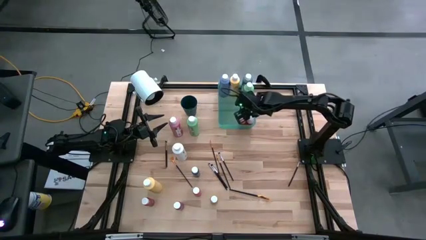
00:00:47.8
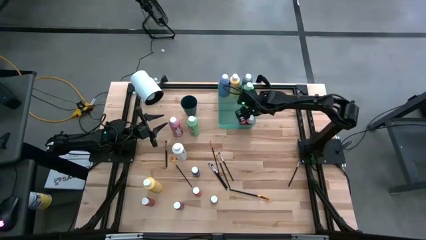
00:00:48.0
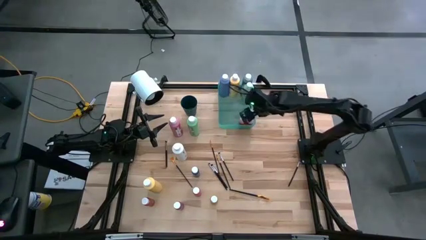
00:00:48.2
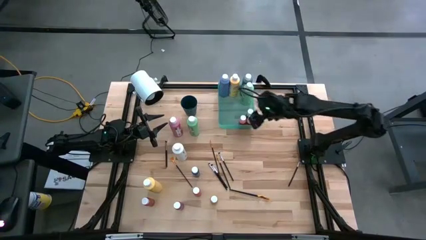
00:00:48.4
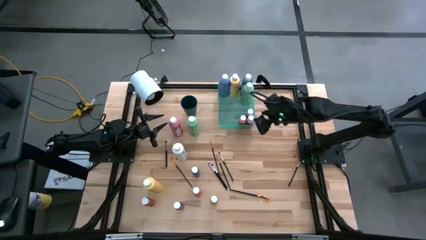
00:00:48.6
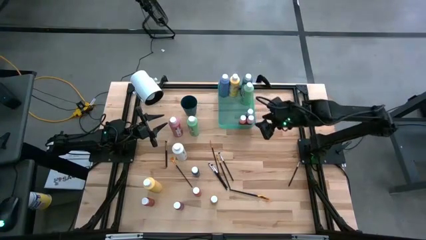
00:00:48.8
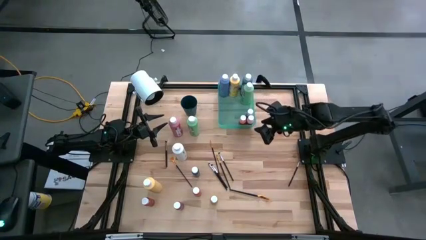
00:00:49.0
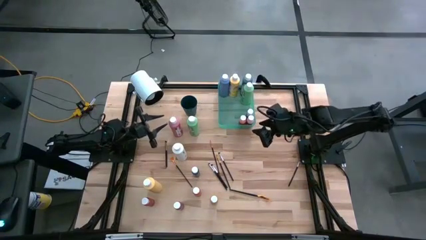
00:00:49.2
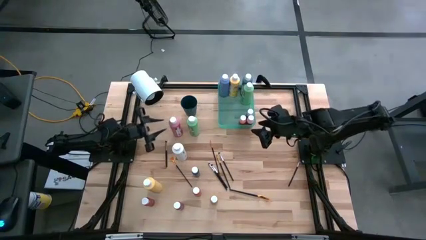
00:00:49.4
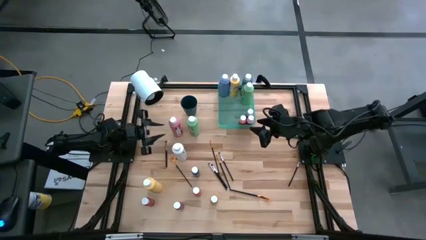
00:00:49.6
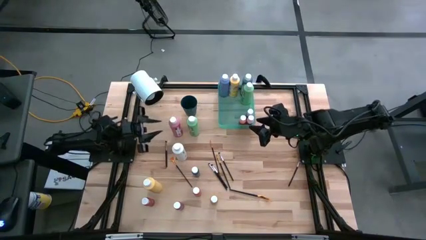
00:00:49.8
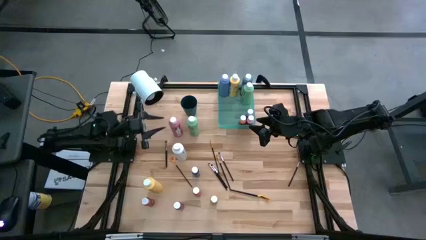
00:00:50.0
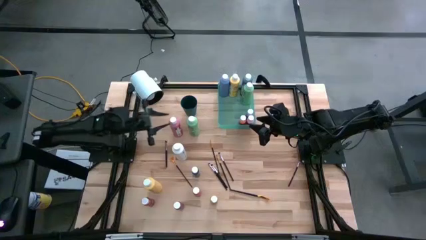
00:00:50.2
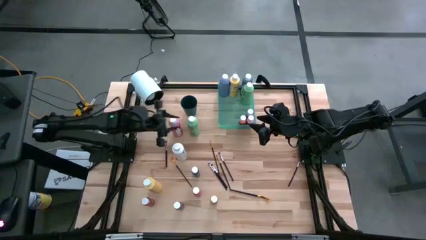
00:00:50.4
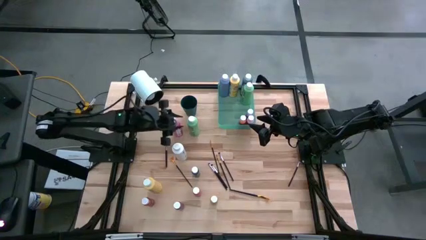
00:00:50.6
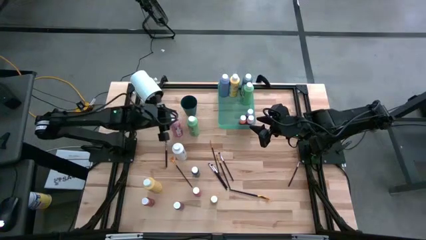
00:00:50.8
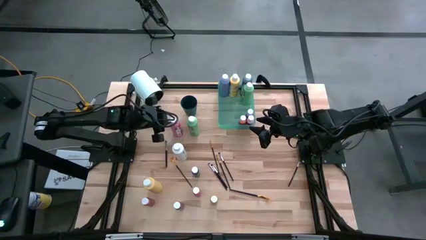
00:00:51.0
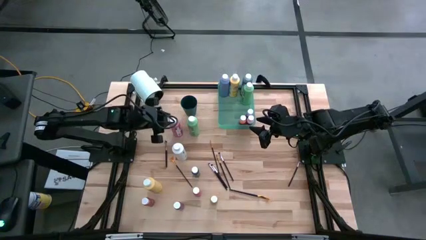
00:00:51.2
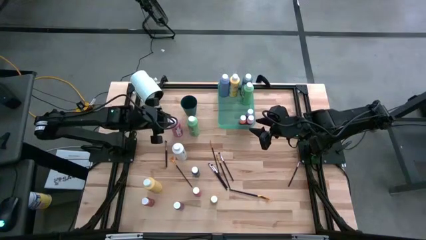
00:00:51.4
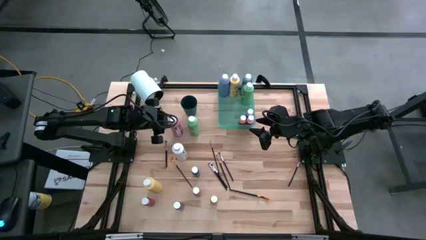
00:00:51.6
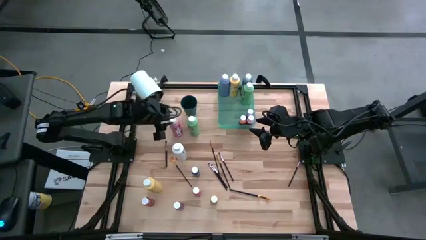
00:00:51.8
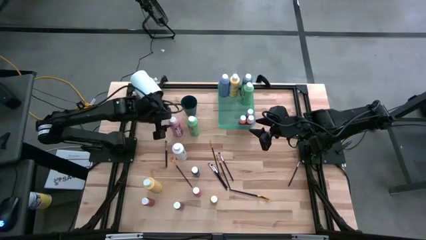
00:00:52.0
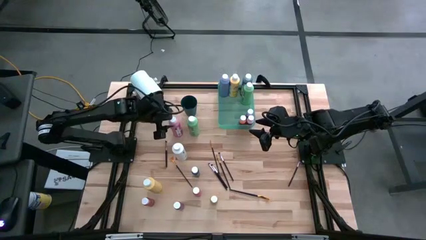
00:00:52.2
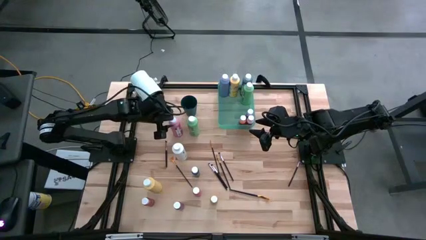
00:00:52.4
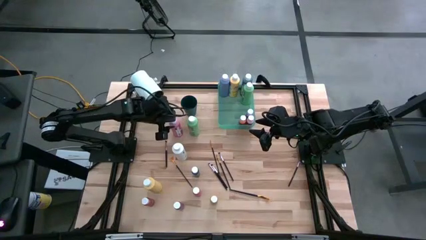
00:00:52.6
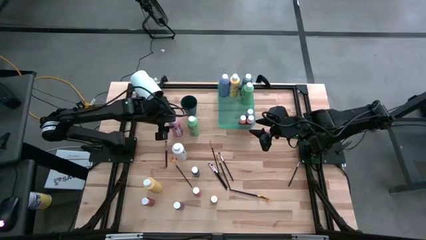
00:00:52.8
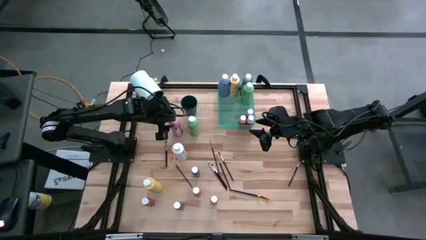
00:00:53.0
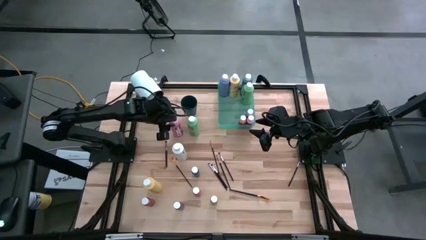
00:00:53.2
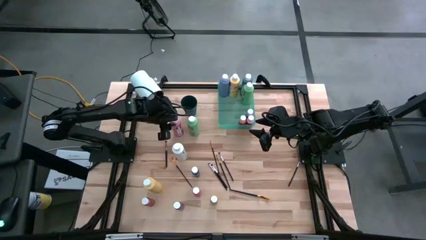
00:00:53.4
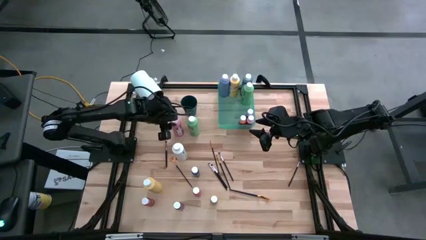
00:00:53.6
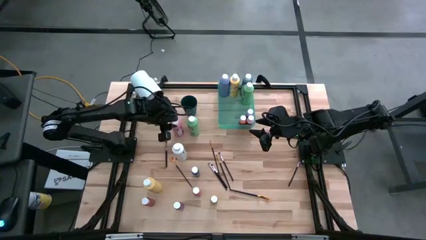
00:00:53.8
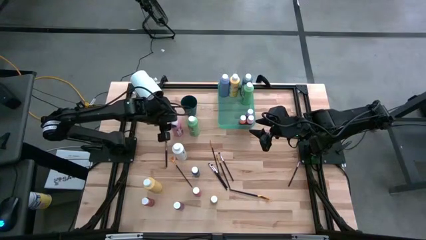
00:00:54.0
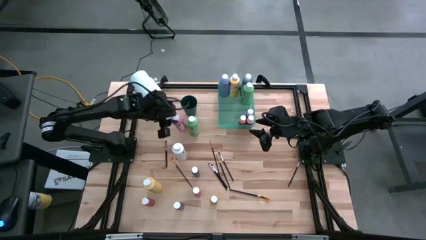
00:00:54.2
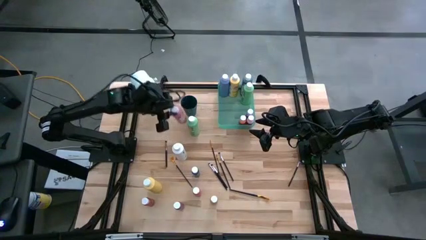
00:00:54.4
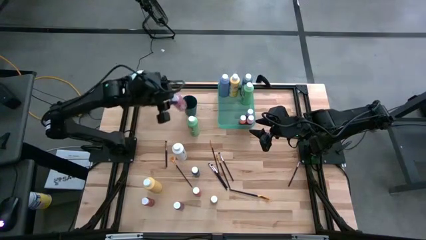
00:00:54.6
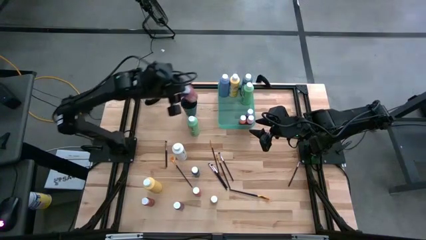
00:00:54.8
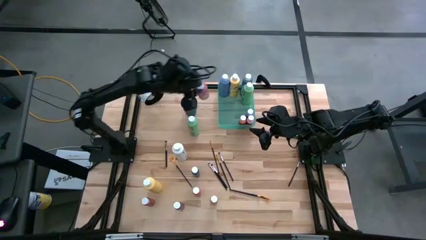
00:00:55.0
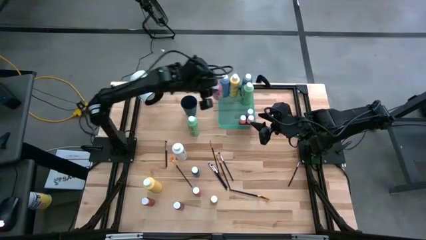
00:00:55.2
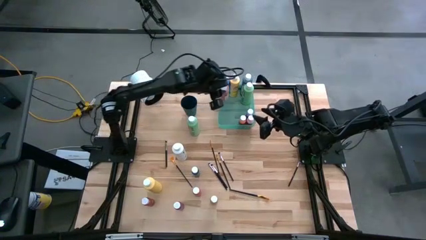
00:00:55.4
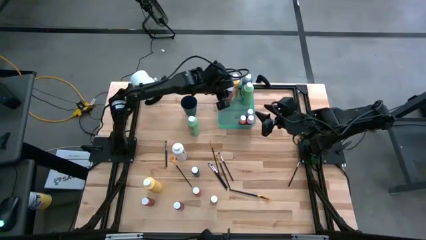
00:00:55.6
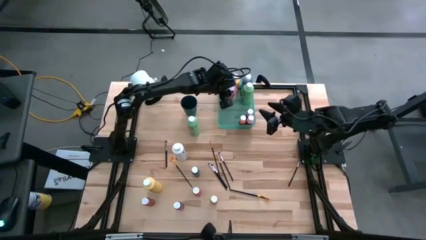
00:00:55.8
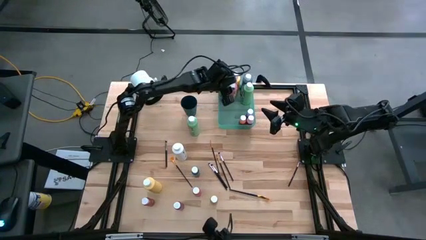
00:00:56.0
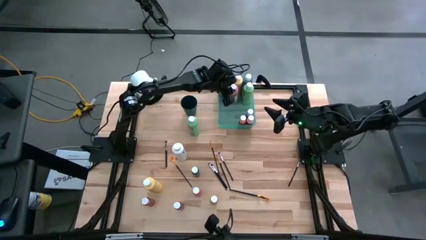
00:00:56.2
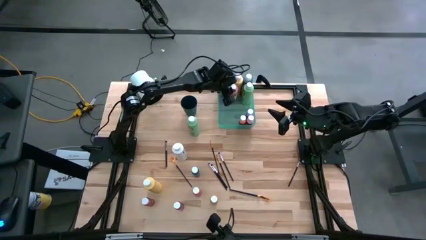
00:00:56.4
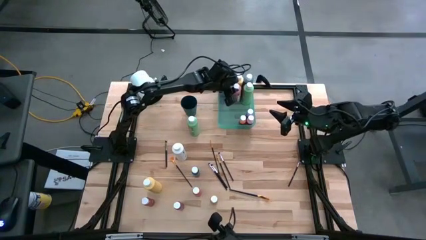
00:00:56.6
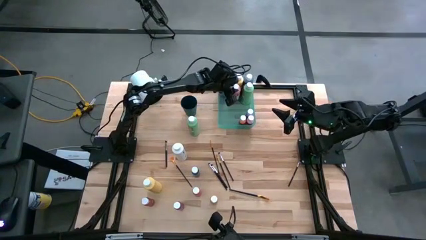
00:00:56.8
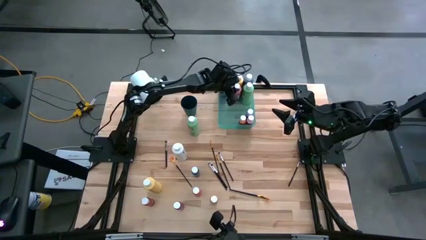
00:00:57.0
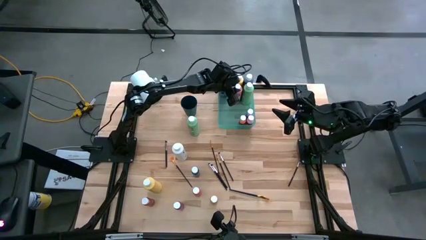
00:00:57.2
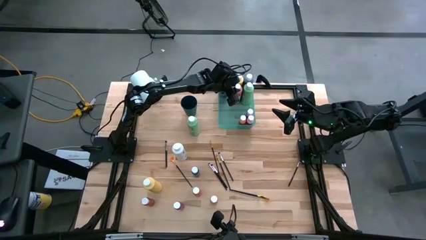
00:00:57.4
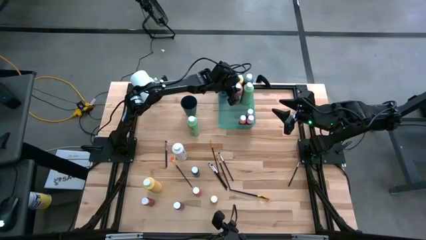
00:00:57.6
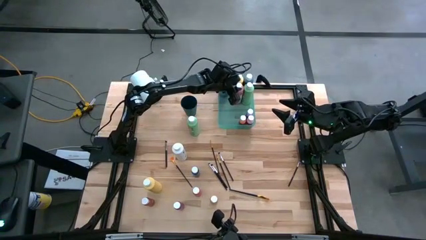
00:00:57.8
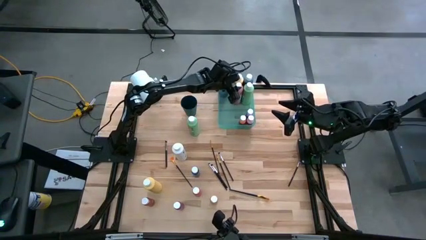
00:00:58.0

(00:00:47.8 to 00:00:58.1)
Task: Pick & Place Paint Supplies
Put the pink big paint bottle into the green bin

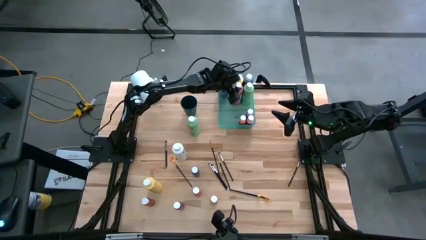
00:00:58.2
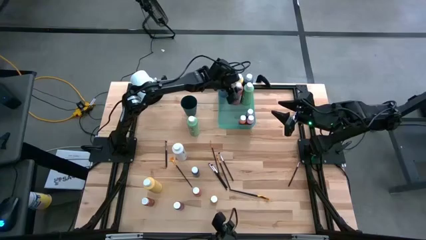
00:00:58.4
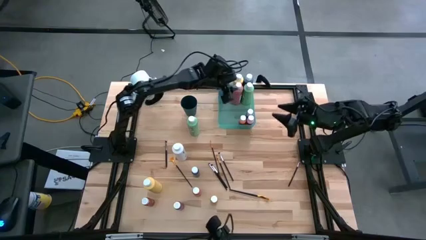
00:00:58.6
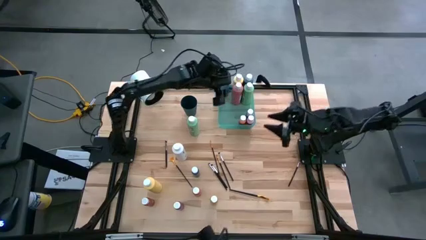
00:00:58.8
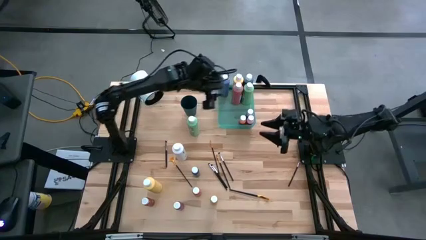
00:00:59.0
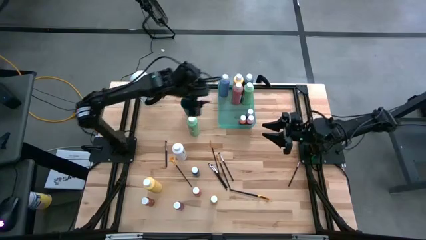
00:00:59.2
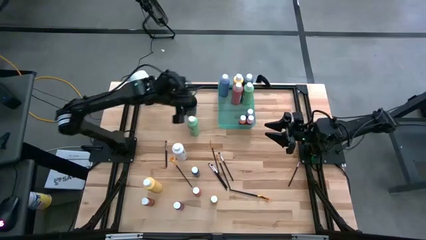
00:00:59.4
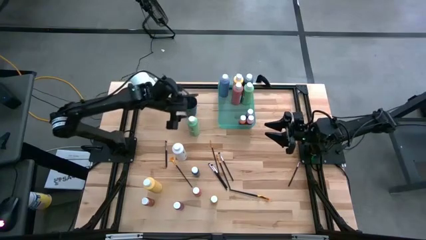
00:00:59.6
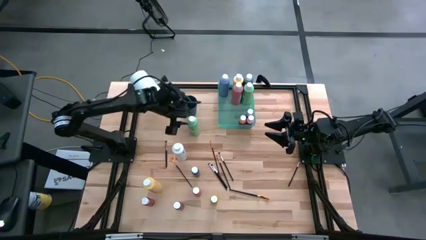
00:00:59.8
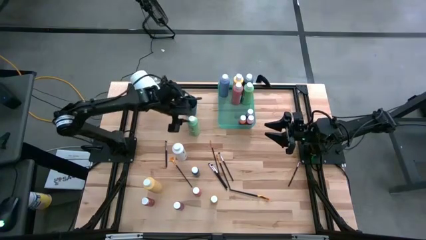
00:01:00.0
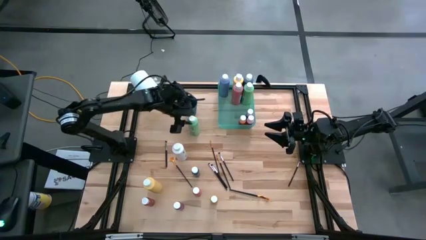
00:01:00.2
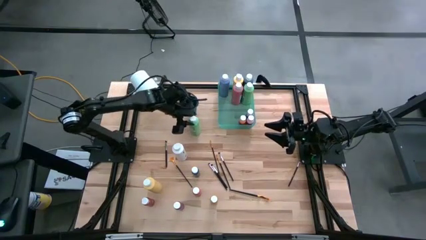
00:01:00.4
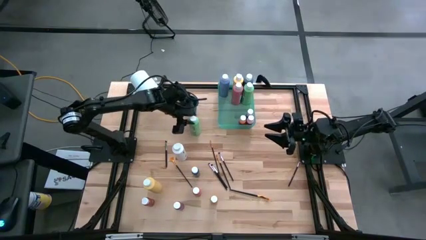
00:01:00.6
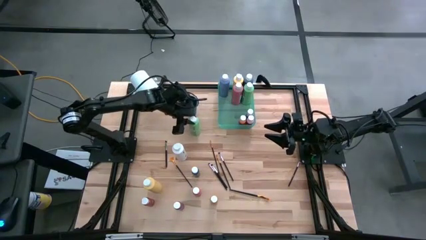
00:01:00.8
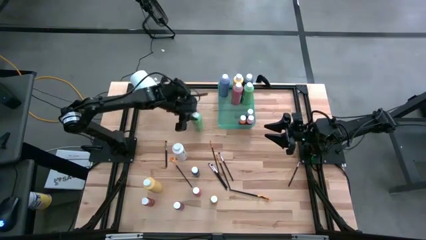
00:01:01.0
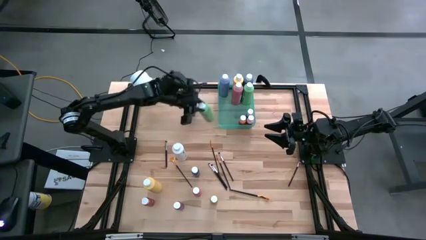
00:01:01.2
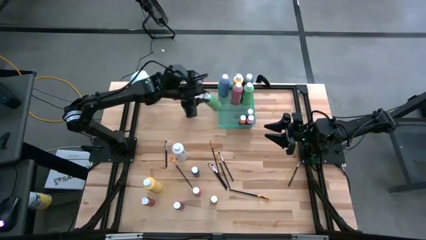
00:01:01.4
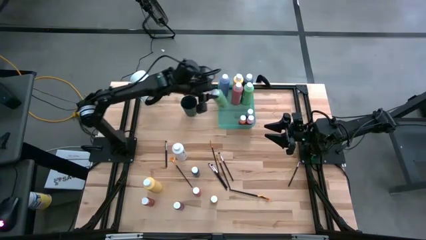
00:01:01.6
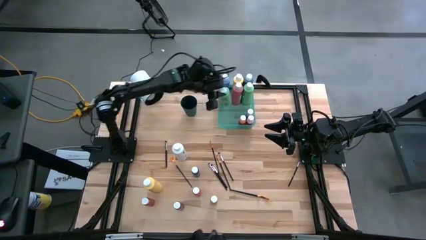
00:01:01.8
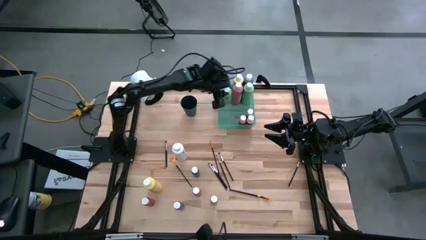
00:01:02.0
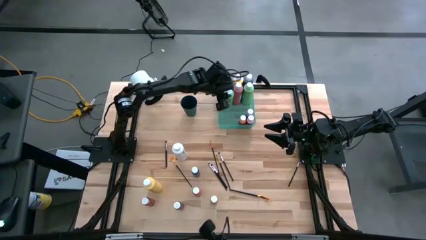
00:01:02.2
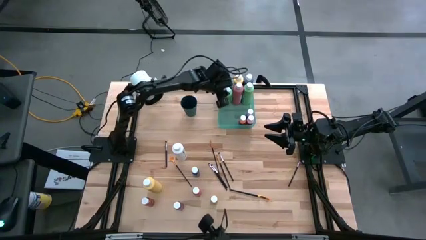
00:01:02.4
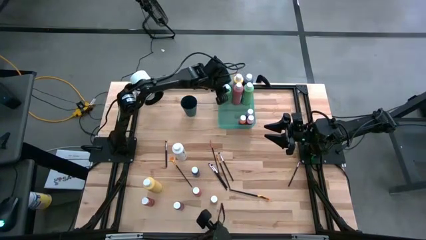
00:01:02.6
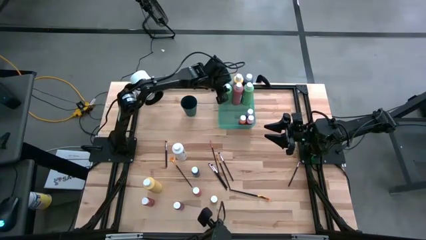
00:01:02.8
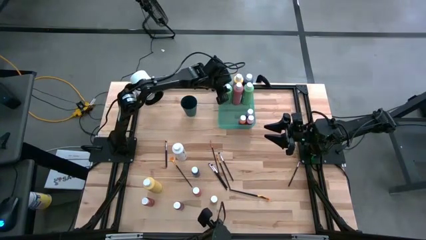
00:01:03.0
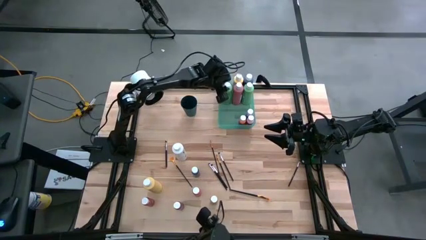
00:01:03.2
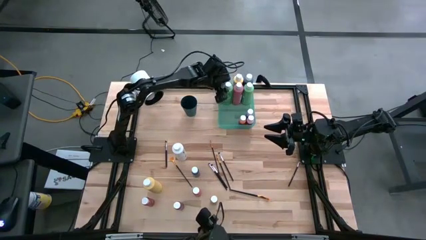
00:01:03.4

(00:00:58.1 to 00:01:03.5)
Put the green big paint bottle into the green bin

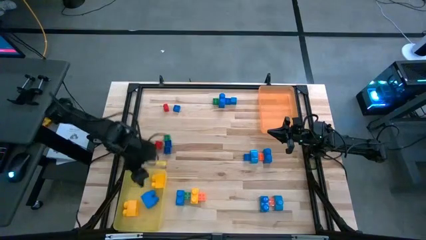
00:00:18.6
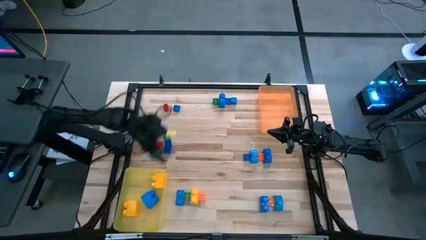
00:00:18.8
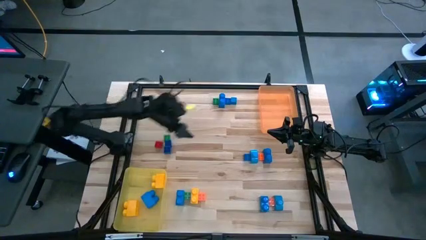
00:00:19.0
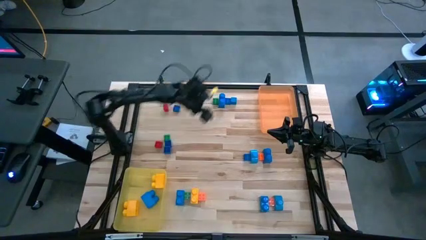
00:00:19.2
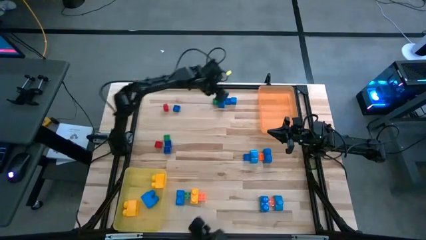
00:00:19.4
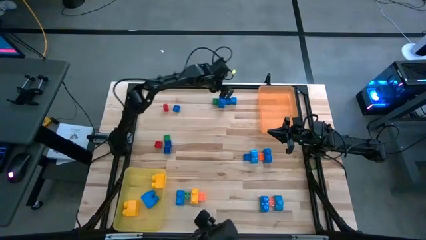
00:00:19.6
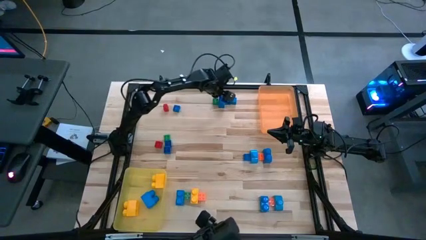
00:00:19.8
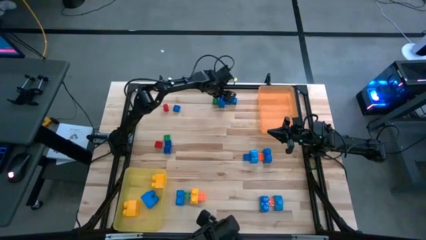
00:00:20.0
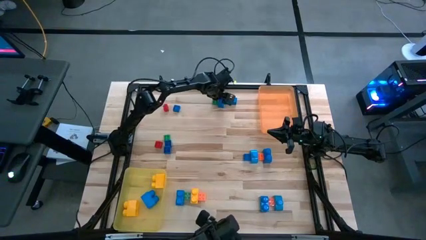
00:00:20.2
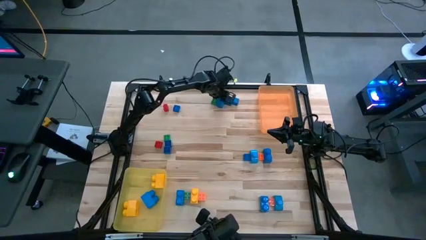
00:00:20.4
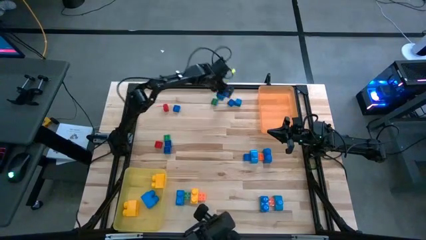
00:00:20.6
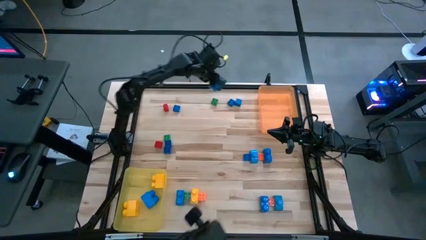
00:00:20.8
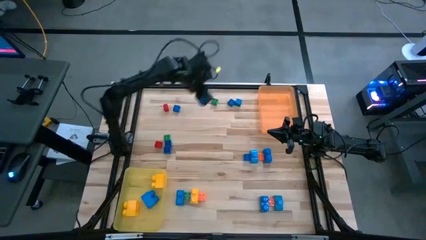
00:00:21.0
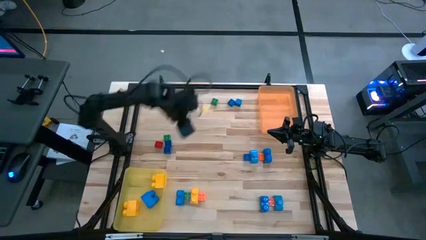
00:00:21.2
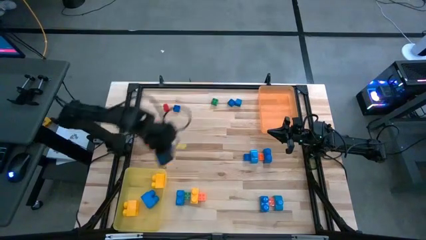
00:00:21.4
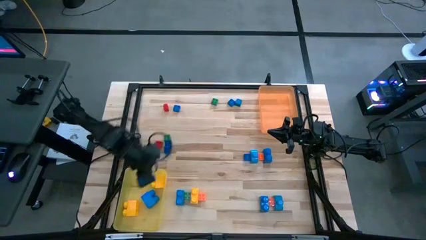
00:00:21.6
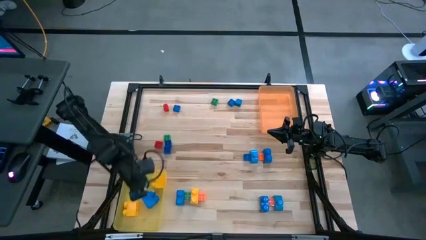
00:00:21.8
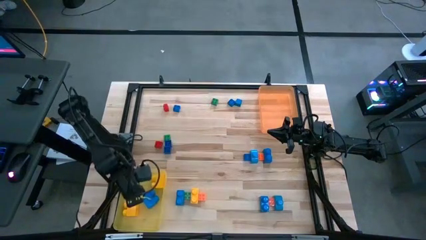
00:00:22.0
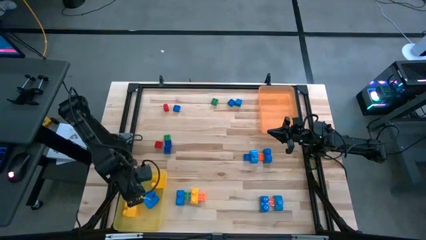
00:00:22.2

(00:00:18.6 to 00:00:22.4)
Task: Sort blocks by size
Put the large blue game piece into the yellow bin
